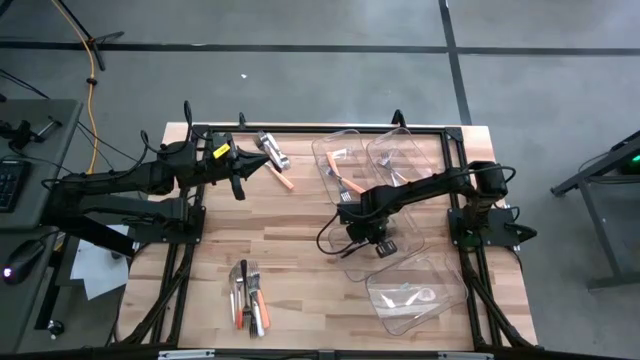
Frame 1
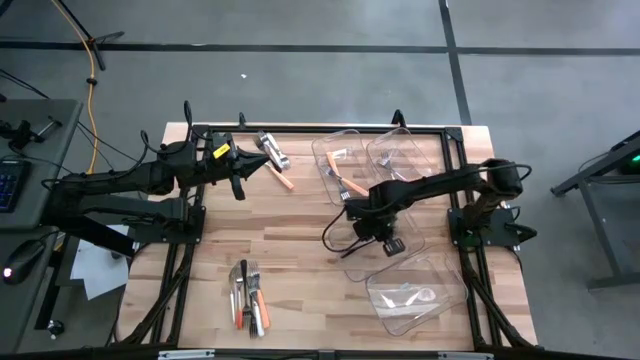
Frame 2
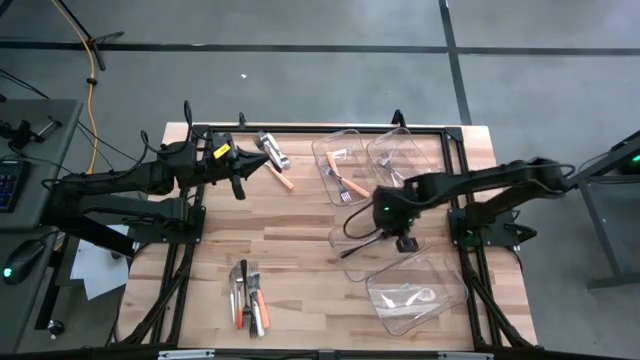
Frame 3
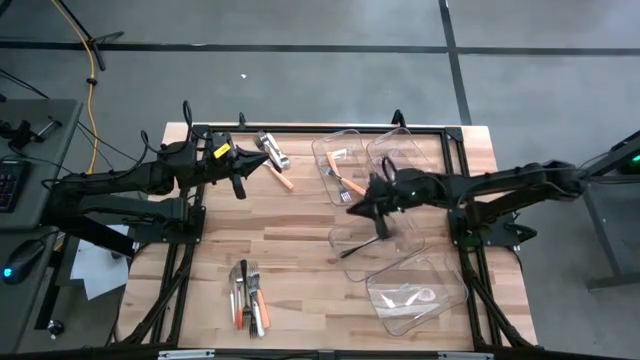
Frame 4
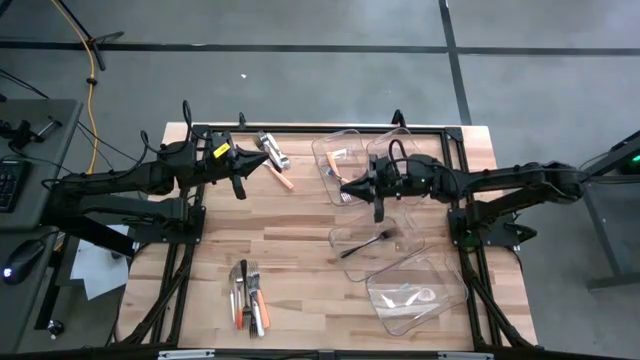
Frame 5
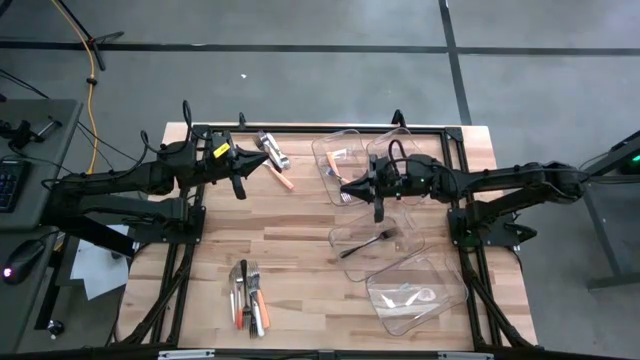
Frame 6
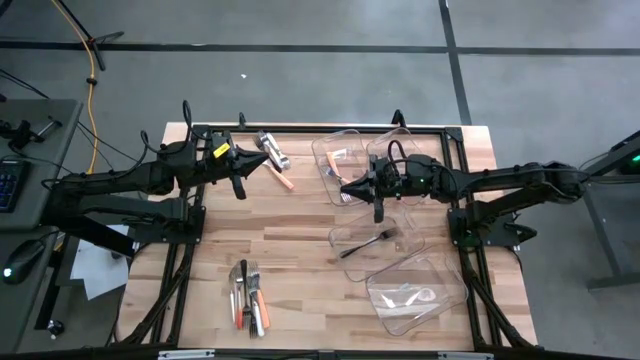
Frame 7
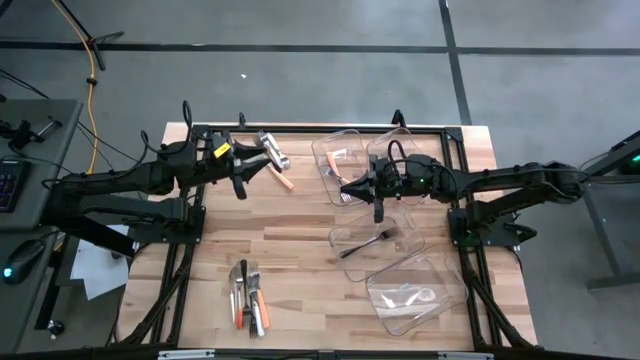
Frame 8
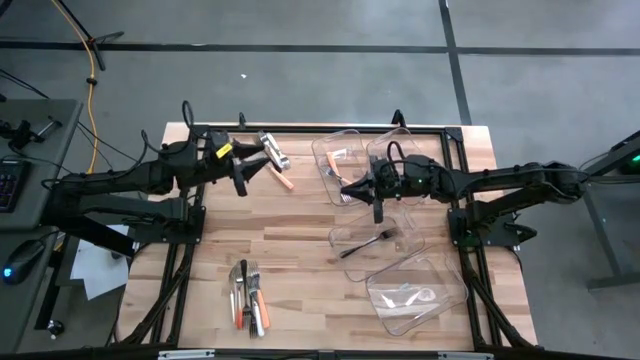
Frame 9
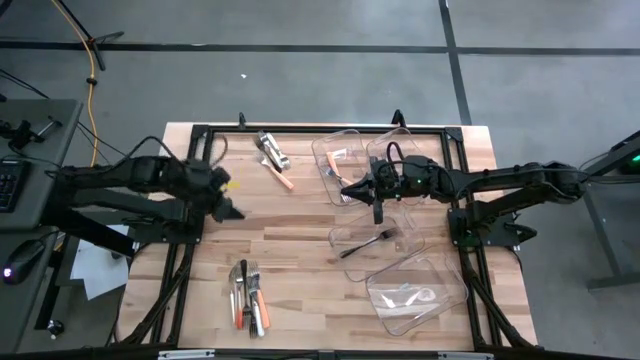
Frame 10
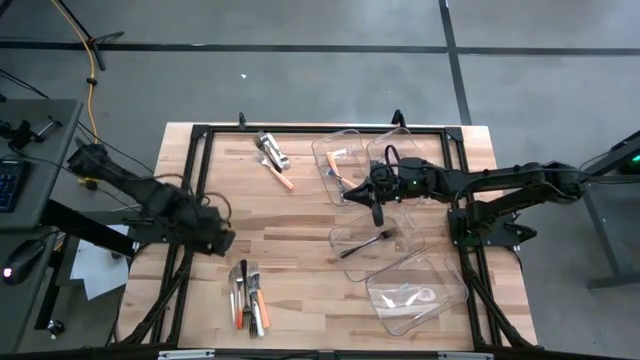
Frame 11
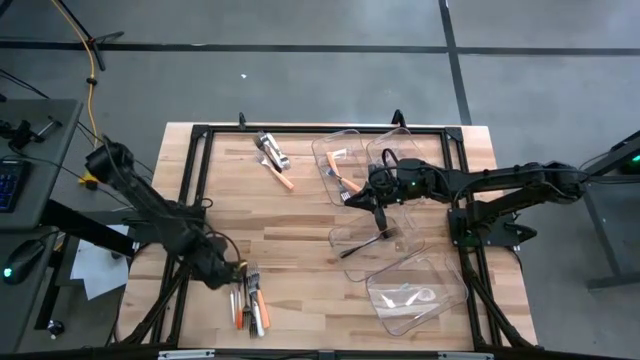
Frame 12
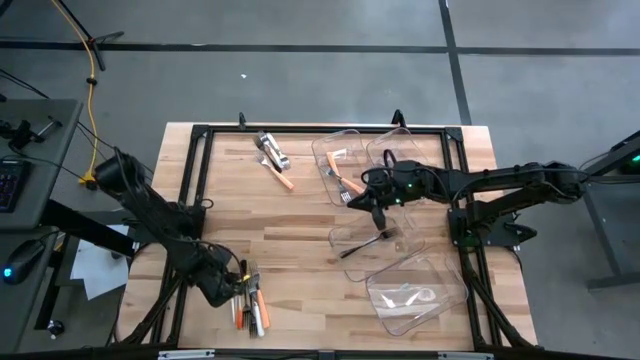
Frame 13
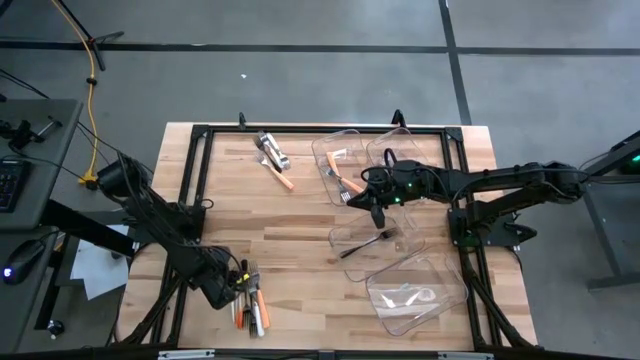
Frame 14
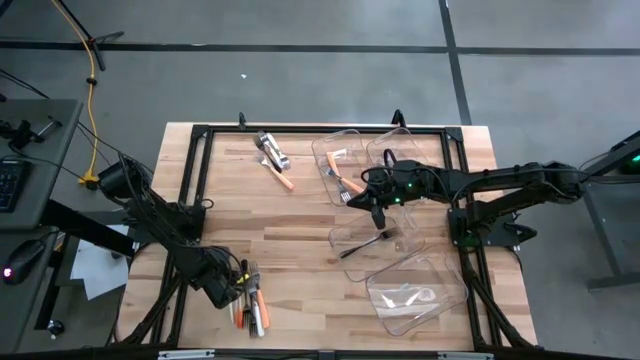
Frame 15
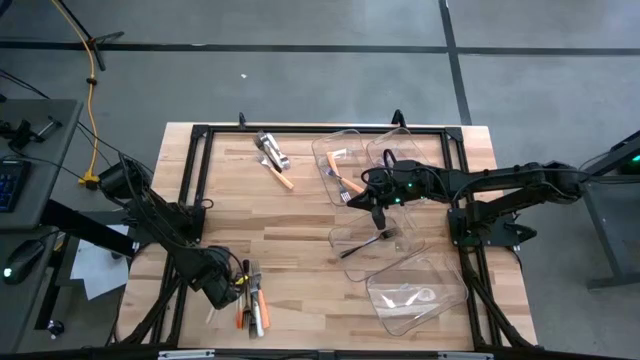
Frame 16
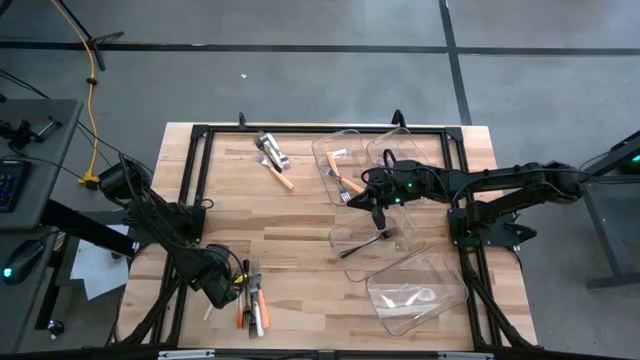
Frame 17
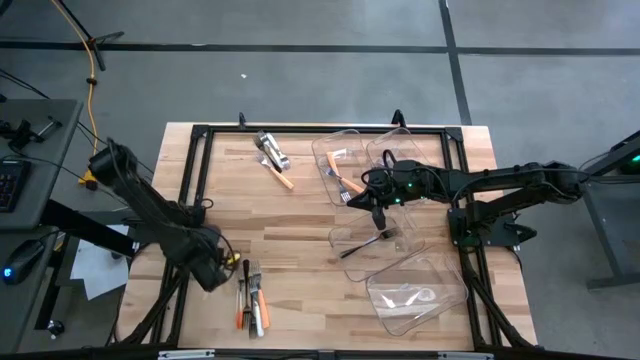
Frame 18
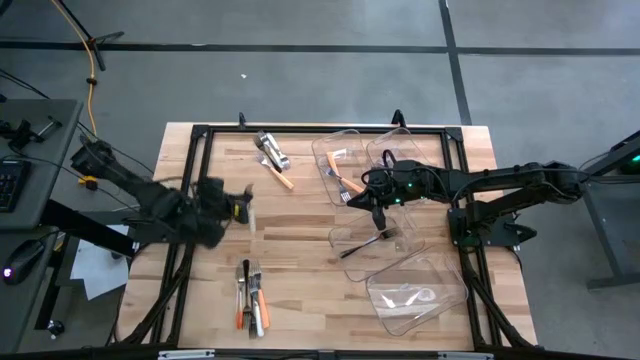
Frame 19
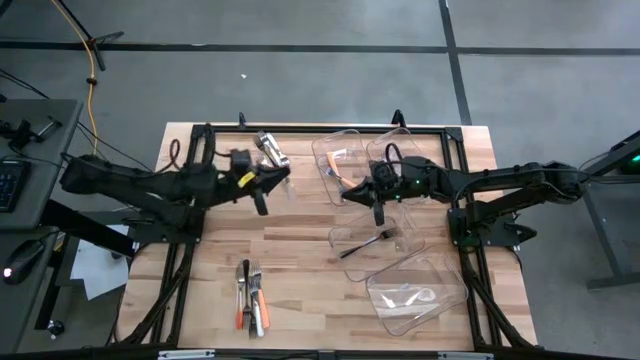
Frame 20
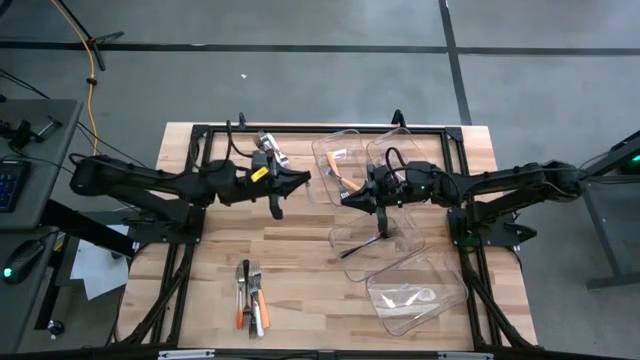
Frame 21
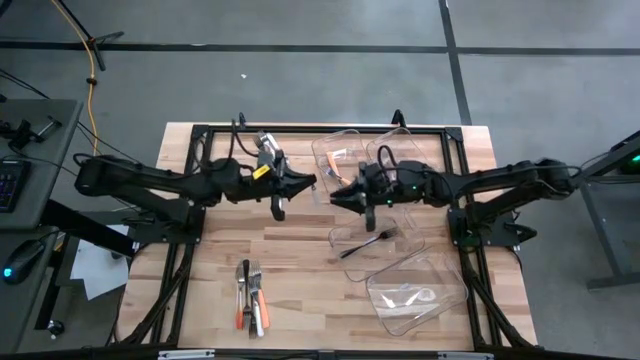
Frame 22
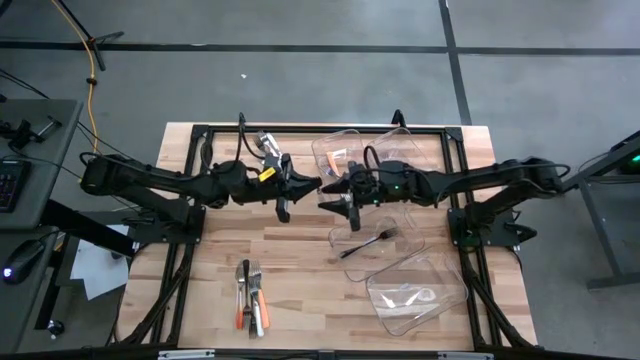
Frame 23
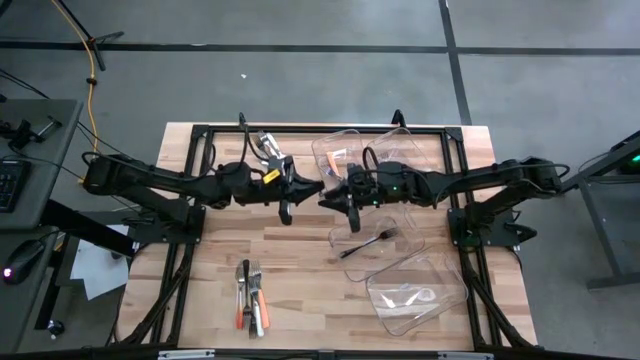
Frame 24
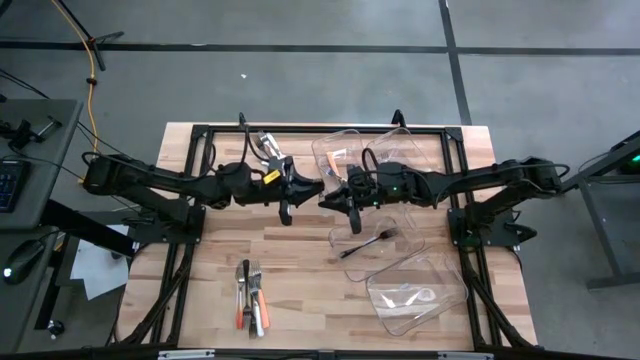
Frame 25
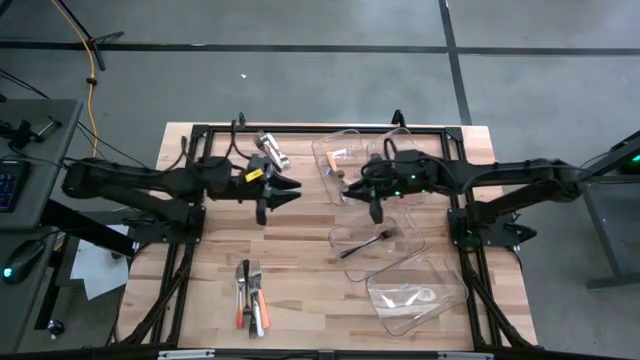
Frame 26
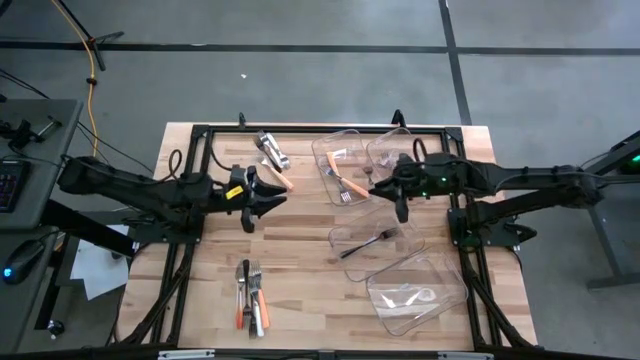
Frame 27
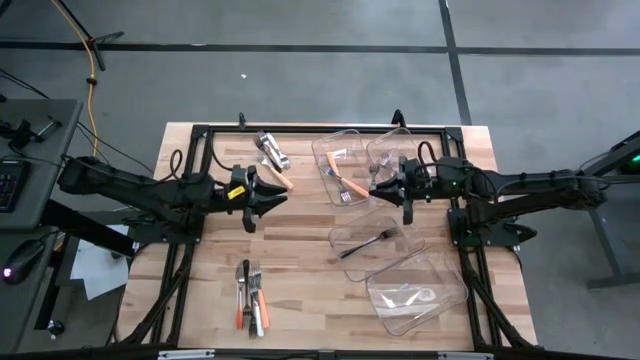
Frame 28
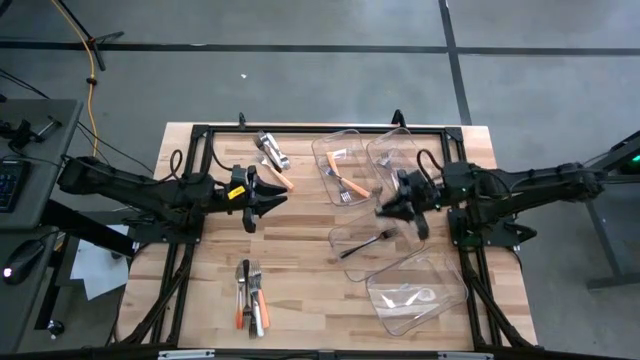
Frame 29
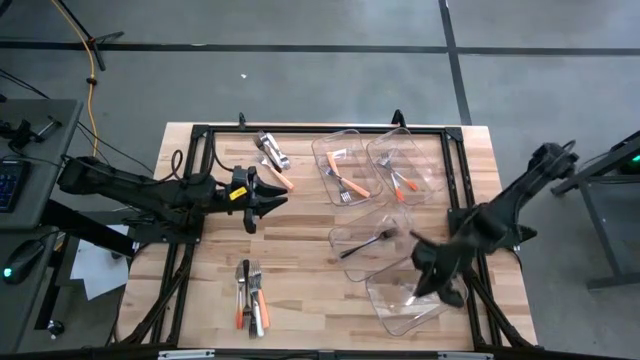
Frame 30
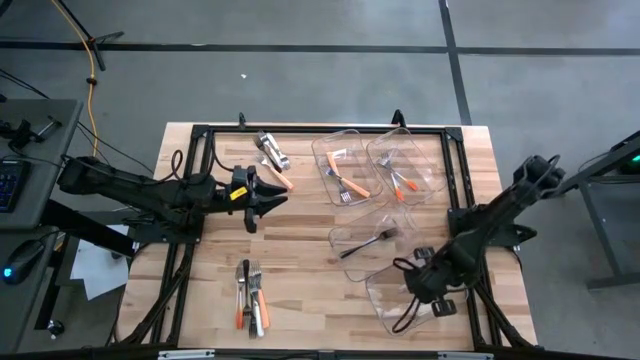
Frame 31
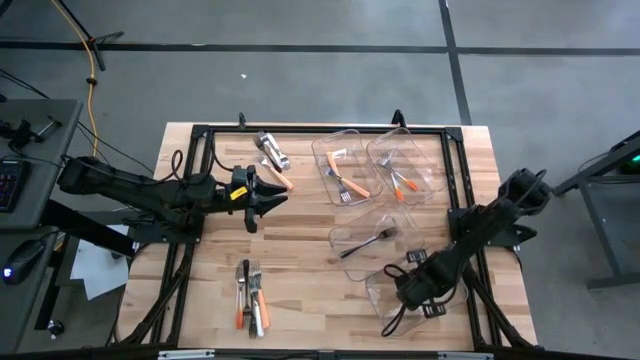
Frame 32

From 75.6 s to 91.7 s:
Task: Sort silverware by color (type)
Put the white fork into the bottom transparent bin

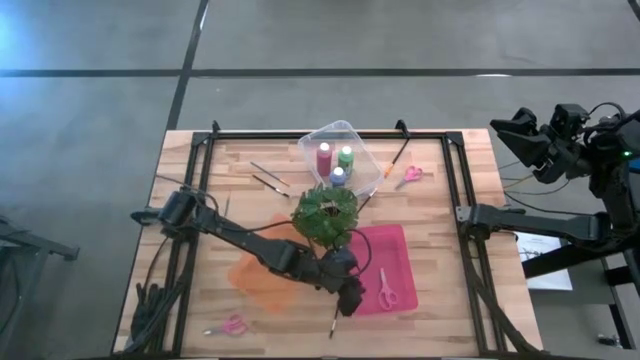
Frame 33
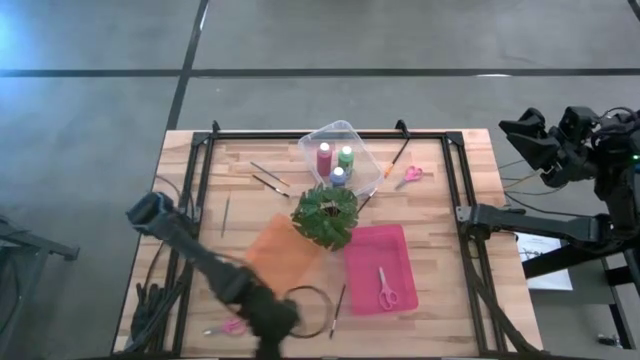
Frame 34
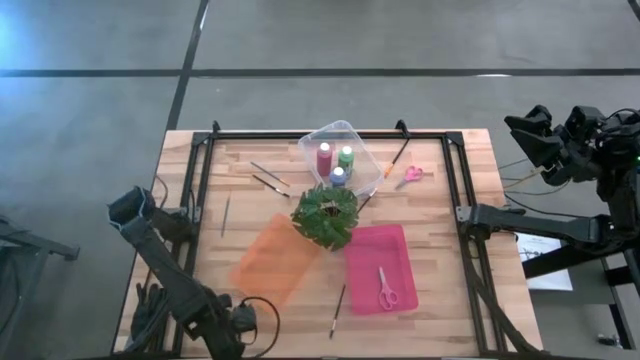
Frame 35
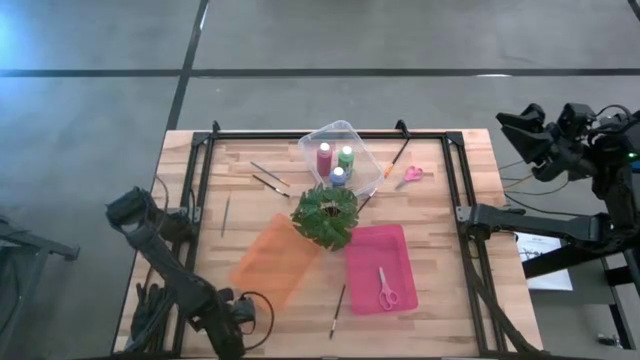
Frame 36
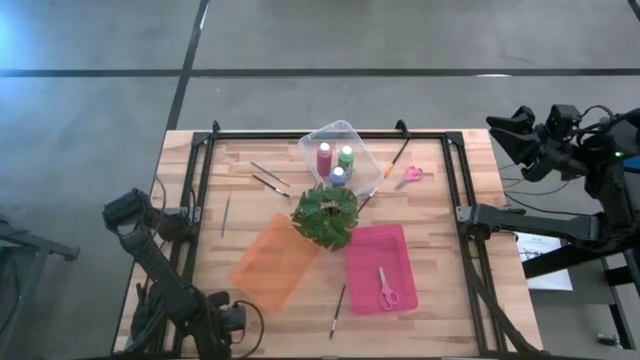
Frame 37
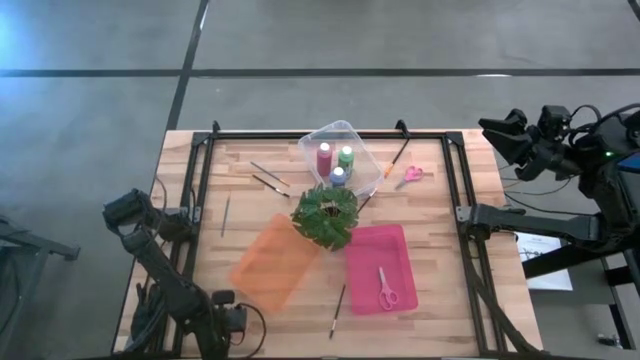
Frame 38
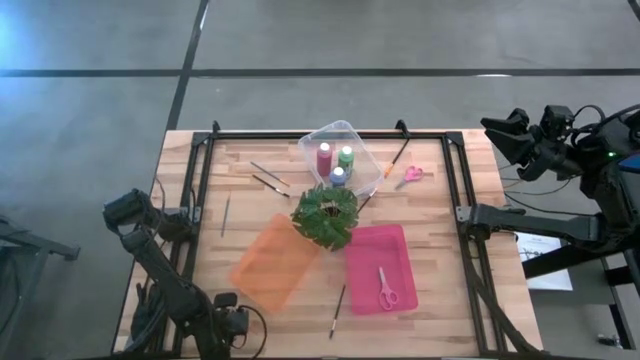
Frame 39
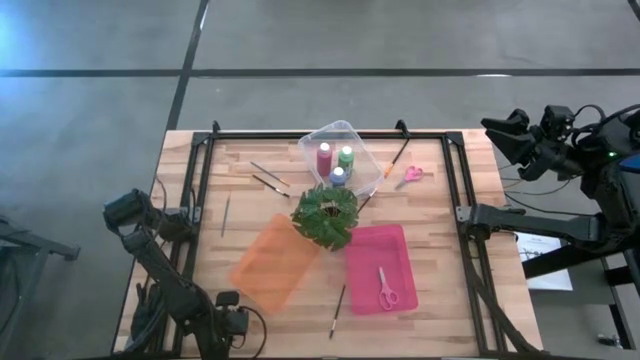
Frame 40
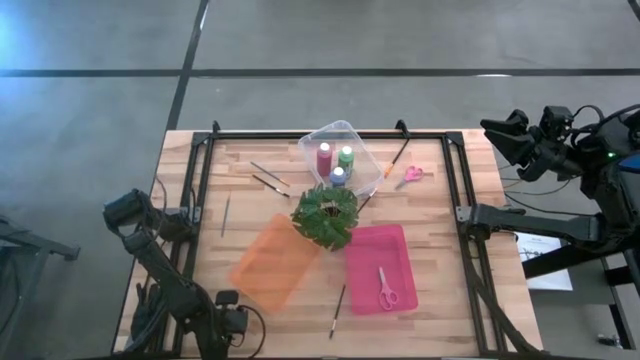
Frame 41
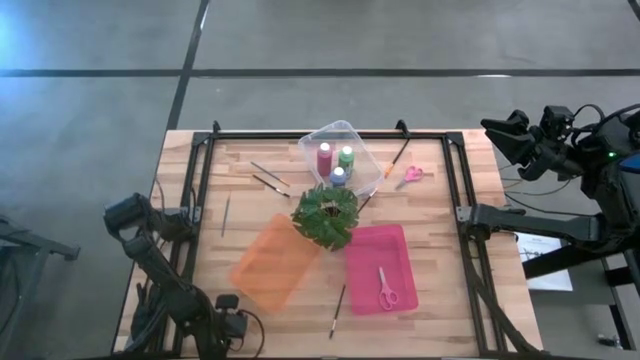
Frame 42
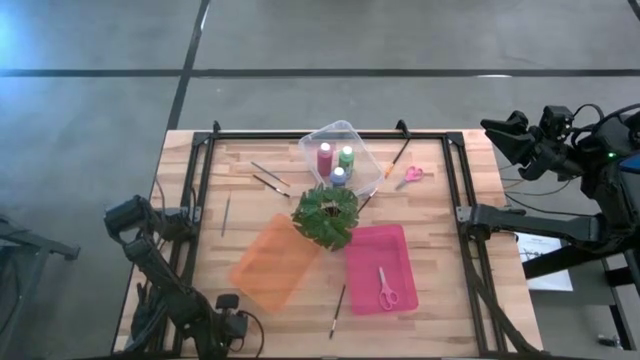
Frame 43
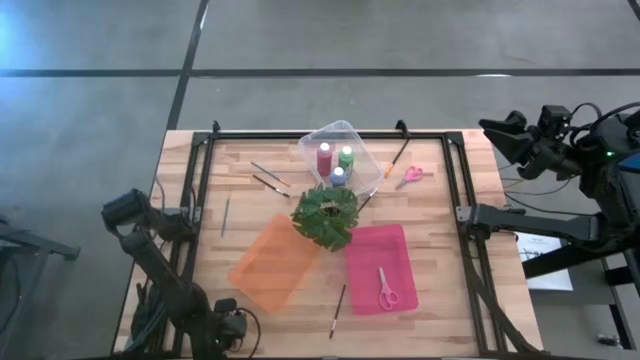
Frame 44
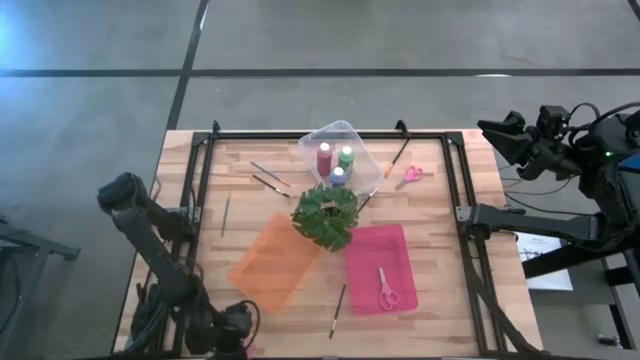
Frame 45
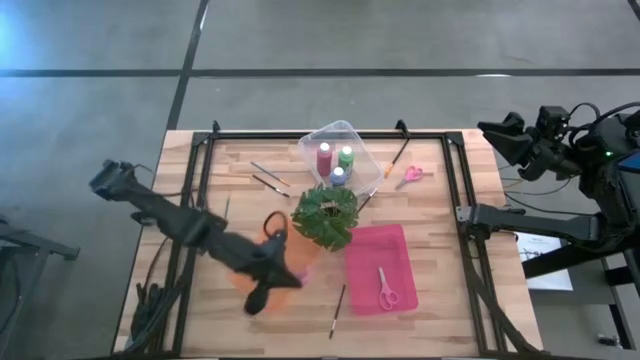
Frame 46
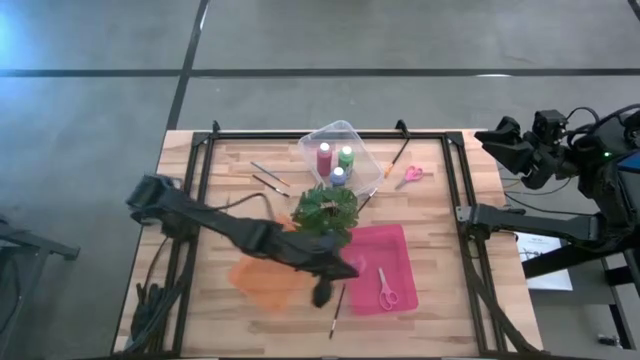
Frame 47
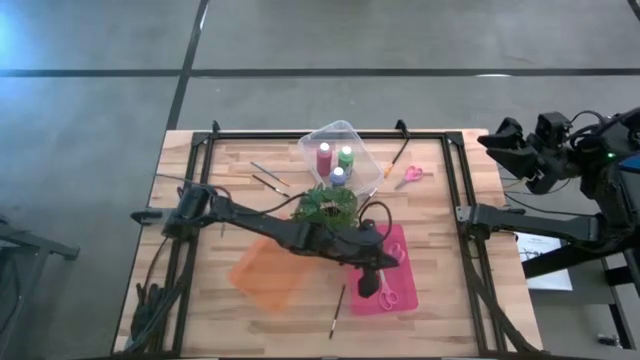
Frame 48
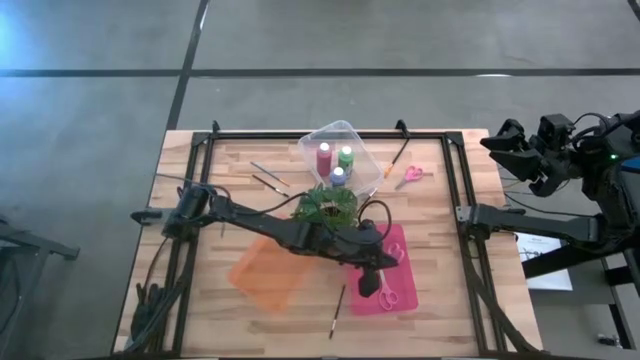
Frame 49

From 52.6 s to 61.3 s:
Task: Pick & Place Paint Supplies
Put the bottom pink scissor into the pink bin
